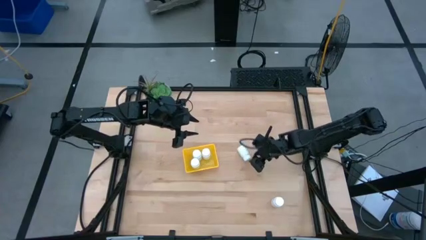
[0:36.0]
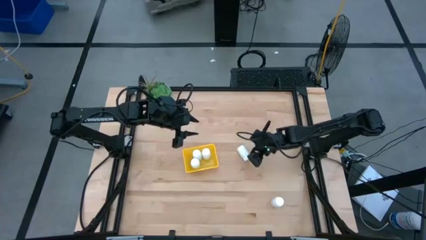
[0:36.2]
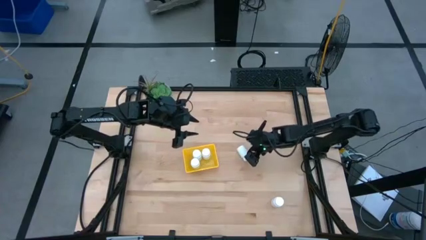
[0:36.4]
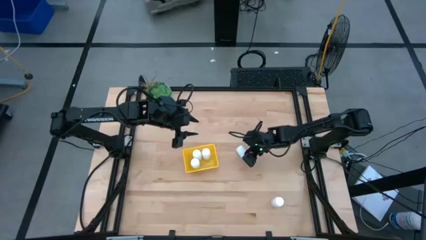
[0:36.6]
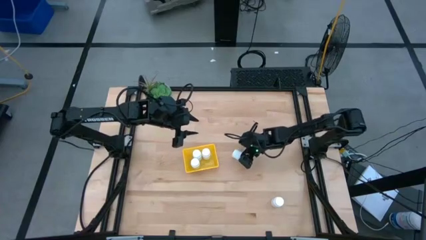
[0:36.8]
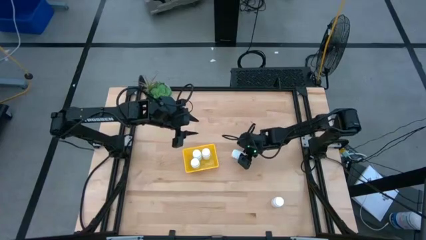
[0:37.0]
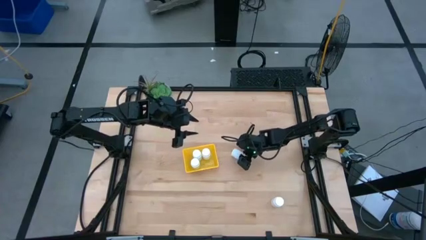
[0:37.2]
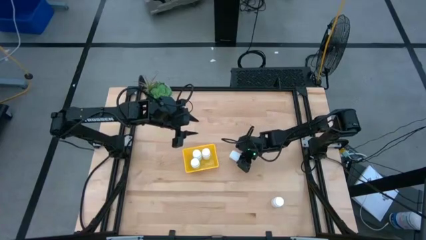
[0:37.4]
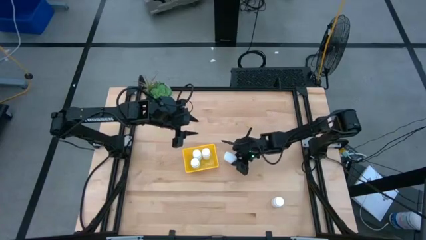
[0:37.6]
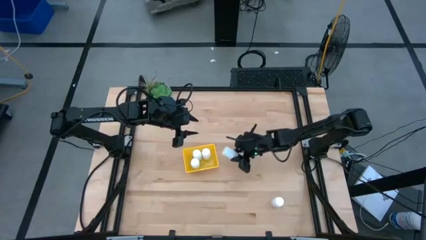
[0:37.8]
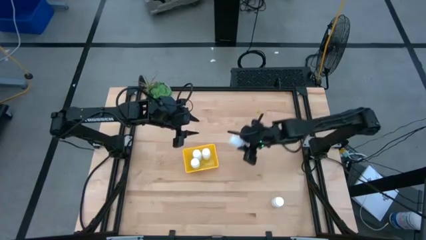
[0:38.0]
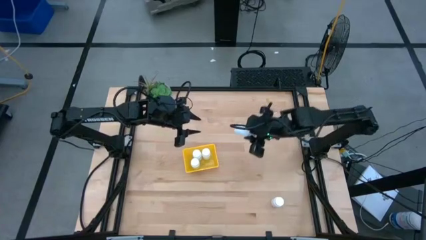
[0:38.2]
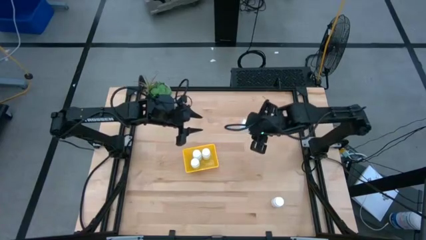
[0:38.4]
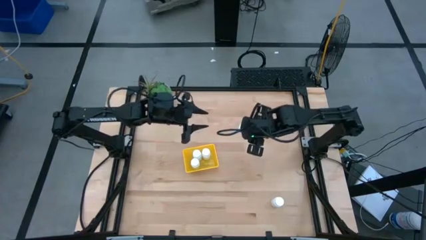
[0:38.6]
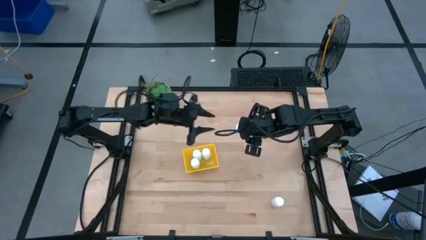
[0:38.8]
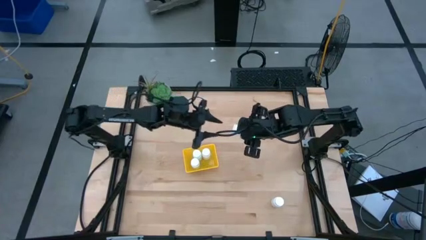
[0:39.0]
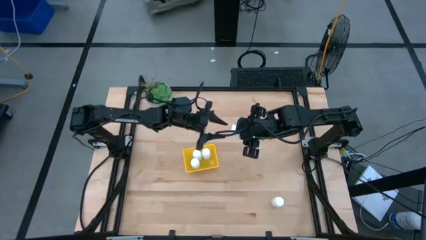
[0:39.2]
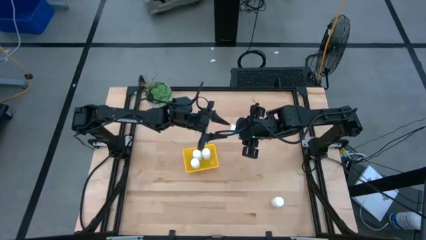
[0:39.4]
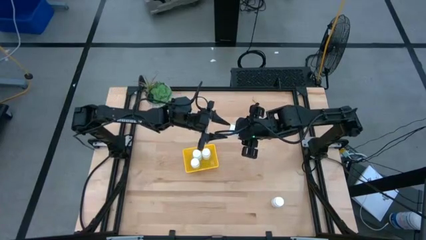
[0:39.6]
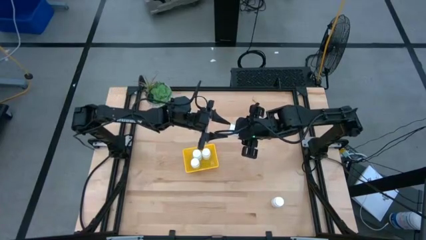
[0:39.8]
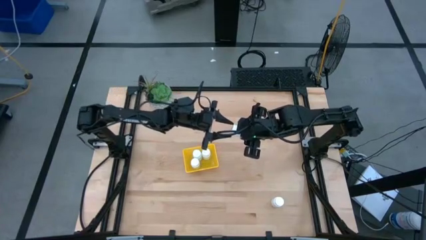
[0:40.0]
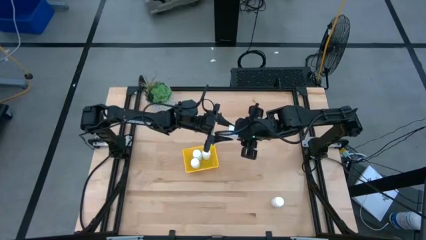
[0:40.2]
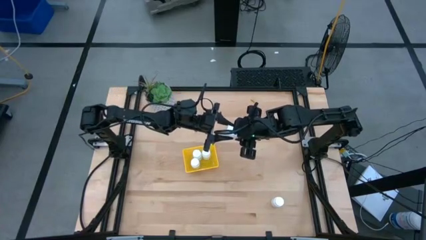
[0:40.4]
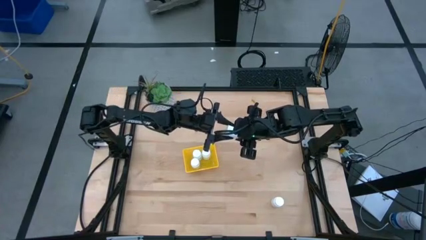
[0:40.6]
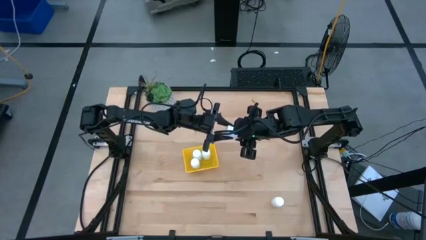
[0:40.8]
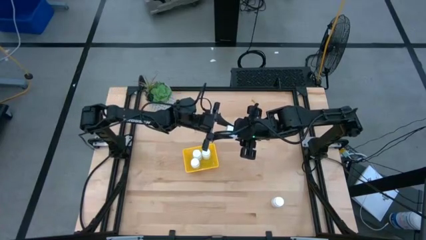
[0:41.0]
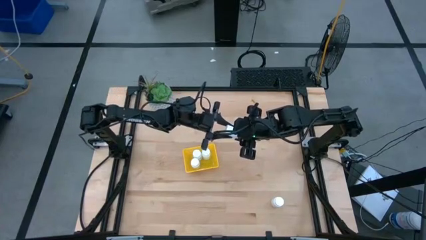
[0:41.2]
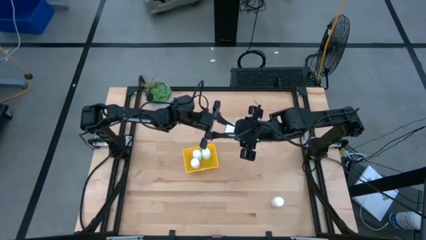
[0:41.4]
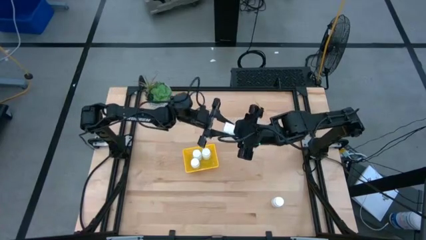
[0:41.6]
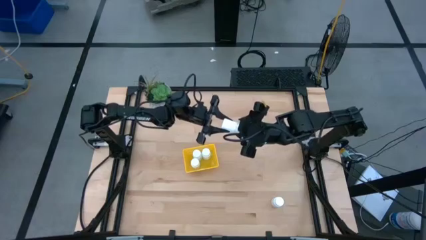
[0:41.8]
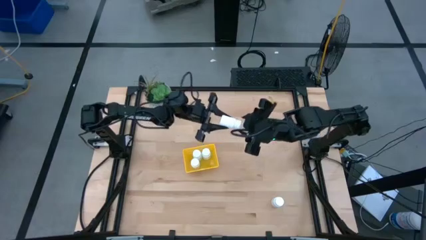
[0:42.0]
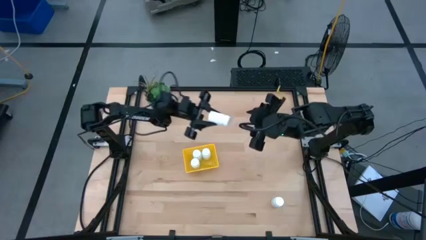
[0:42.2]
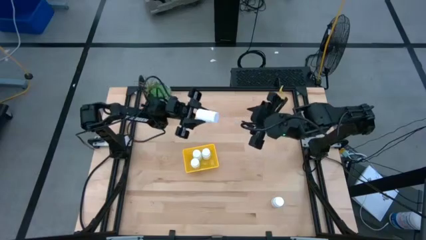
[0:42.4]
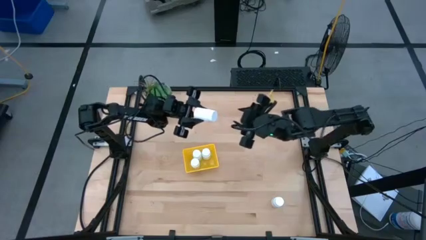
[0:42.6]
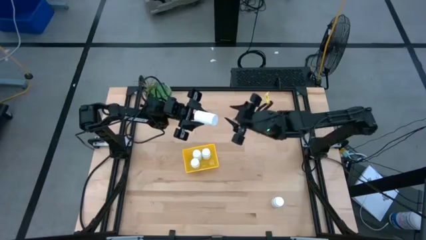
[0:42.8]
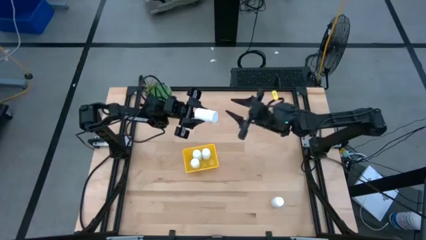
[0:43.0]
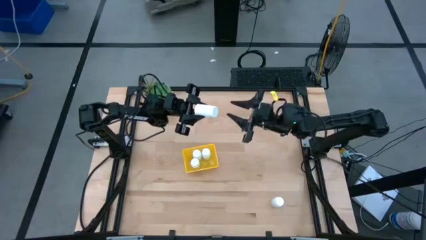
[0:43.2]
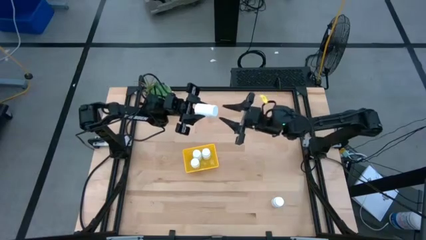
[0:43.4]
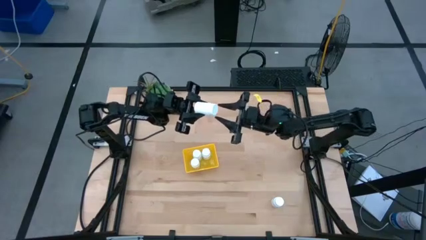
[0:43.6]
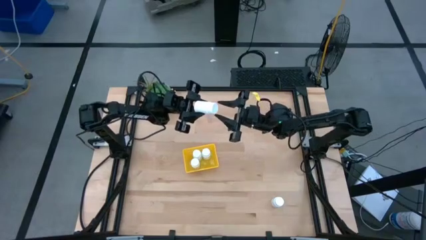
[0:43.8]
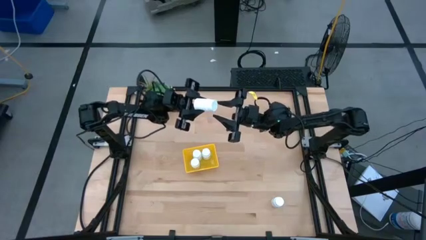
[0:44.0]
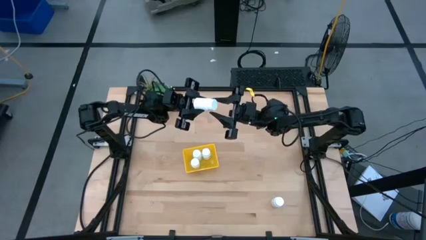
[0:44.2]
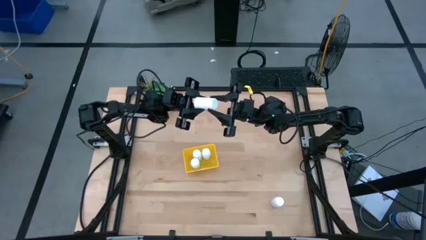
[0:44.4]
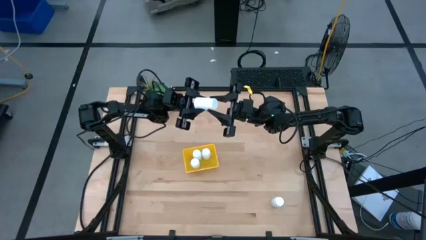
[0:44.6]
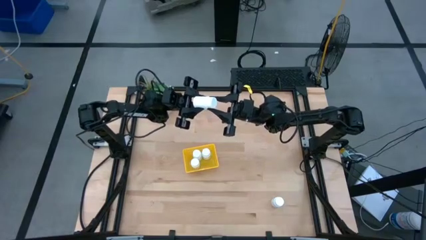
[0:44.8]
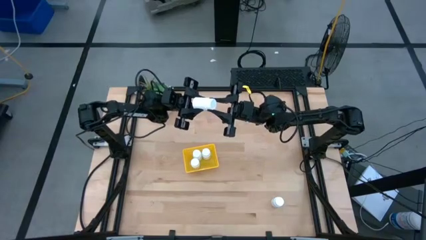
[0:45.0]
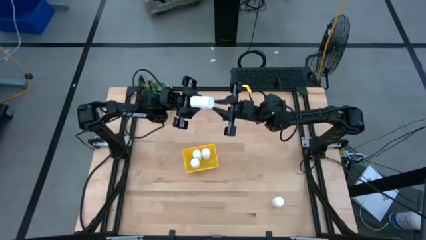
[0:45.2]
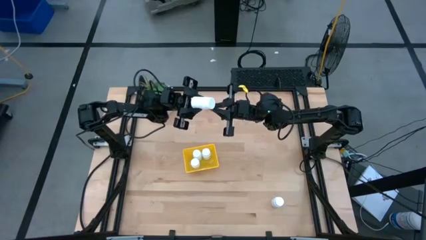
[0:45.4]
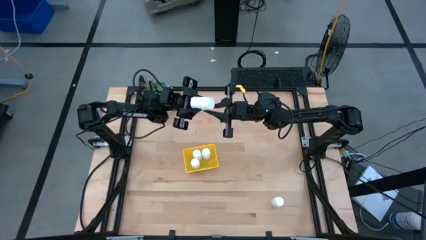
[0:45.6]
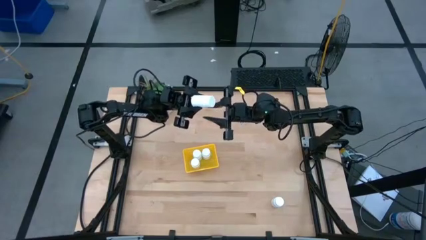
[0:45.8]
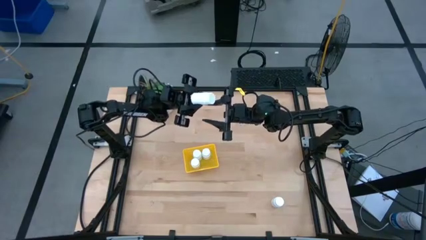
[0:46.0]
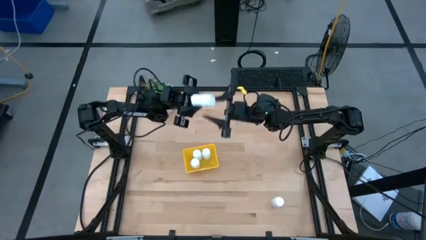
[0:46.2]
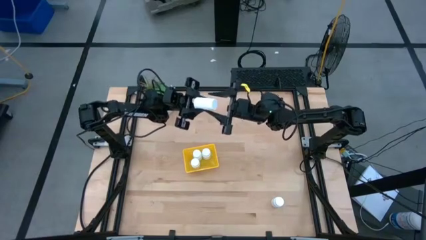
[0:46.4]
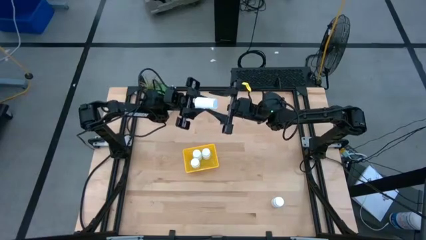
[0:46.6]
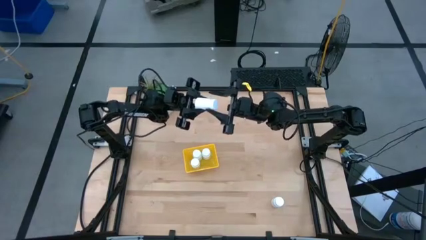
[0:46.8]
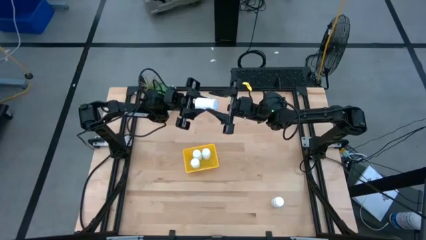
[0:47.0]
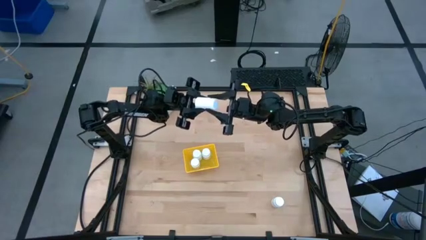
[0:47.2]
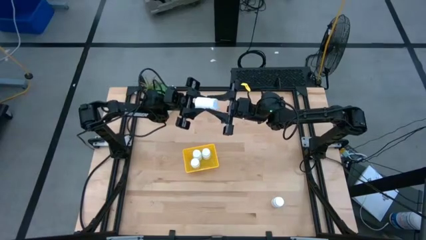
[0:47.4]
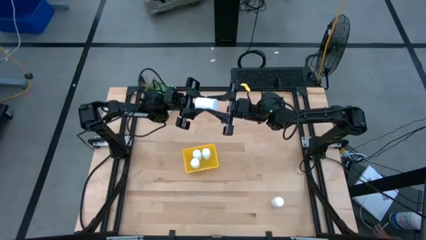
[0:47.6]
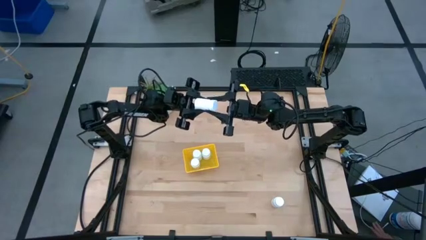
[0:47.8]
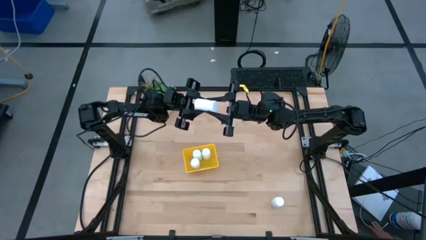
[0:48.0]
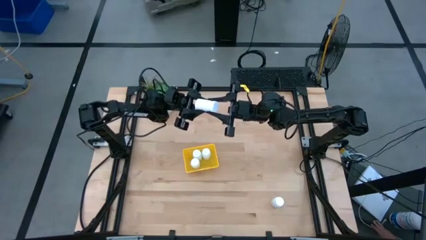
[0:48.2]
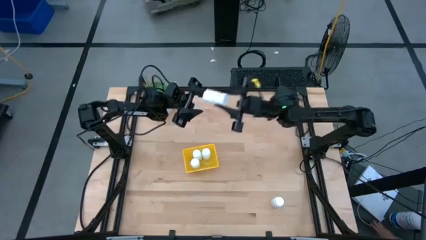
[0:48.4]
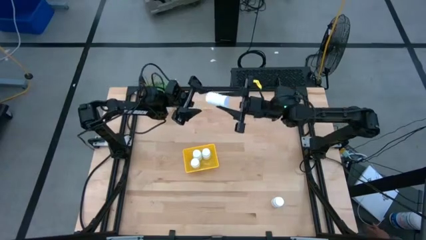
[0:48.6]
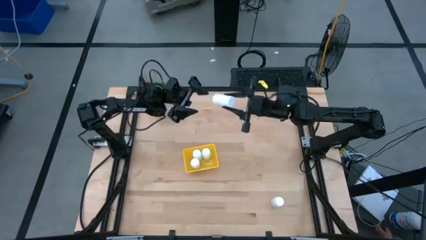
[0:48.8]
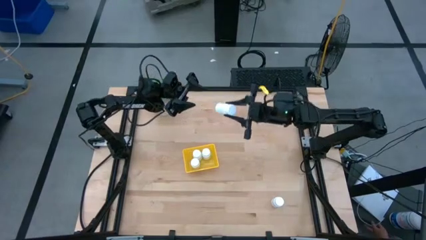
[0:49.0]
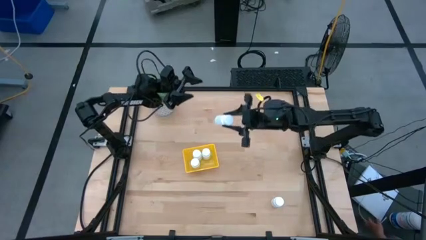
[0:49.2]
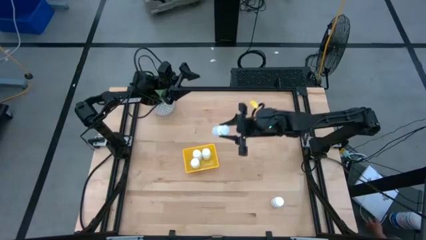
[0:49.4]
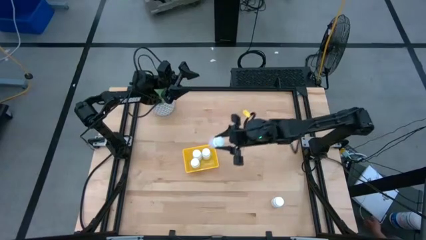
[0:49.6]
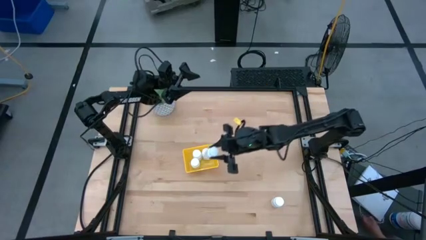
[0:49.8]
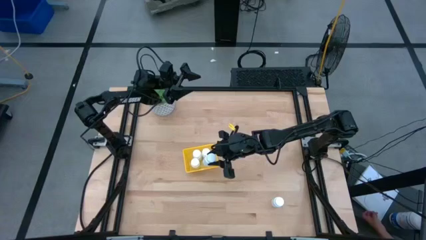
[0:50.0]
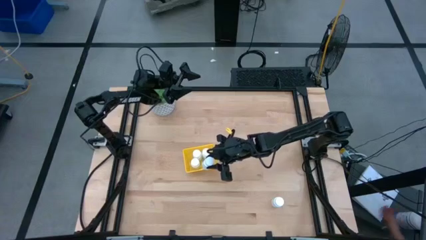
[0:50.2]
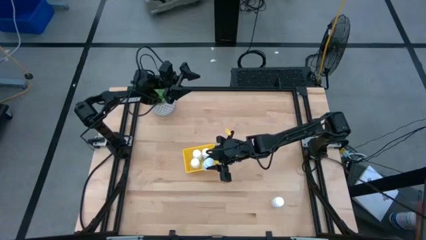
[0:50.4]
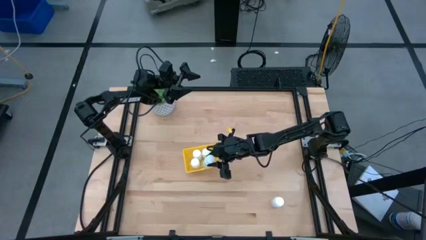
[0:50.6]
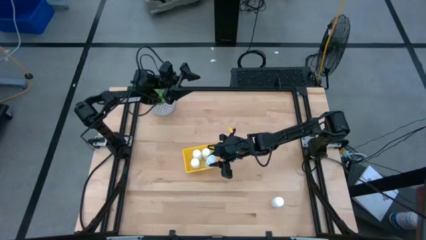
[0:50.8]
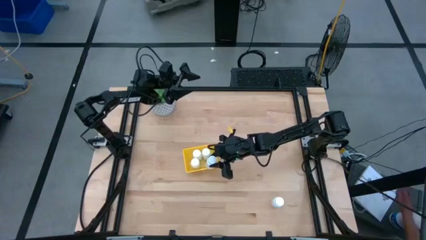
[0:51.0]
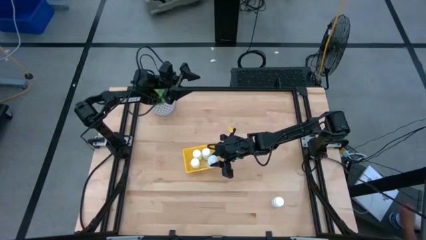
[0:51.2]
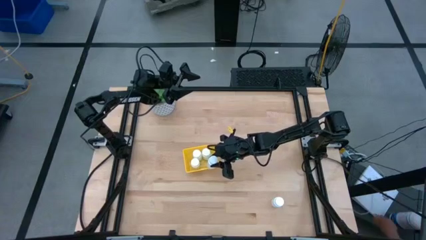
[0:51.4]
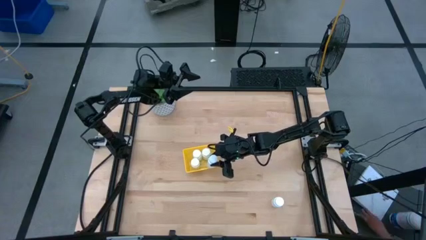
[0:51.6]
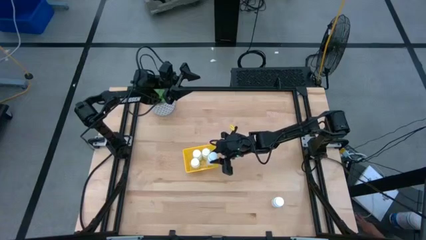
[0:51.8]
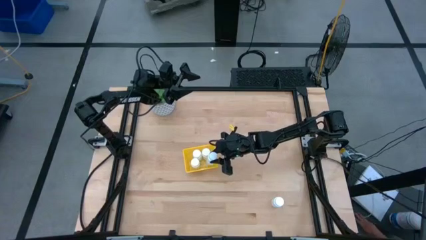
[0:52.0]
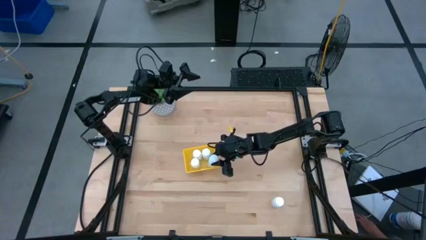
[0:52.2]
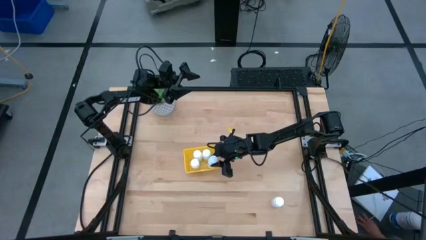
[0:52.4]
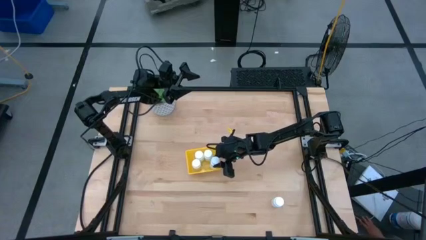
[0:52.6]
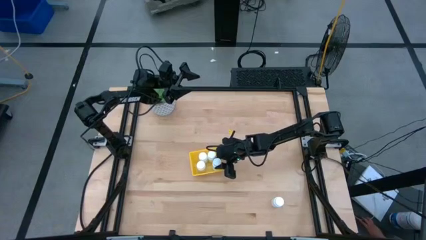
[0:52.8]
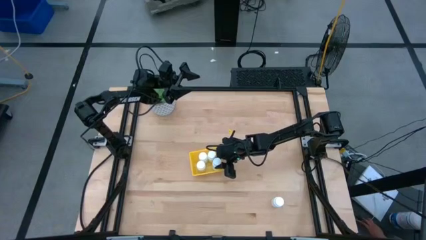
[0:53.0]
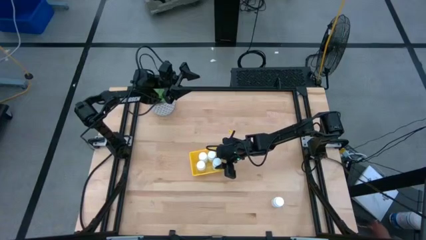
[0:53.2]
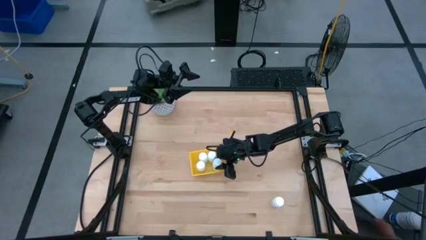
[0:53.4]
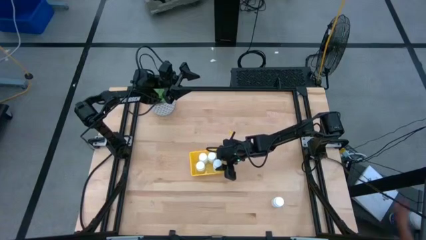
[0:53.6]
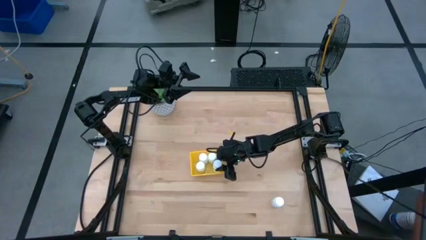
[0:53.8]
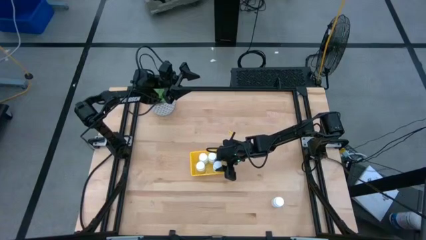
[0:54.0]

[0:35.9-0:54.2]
Task: Pick and place pill bottles into a basket
Put the white medicine bottle into the yellow bin
